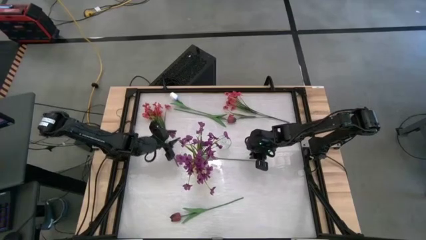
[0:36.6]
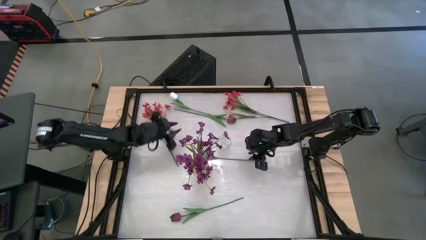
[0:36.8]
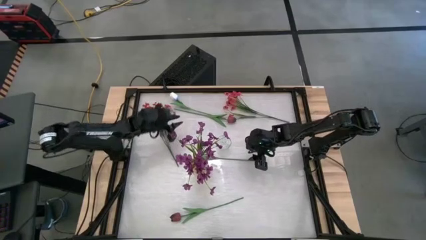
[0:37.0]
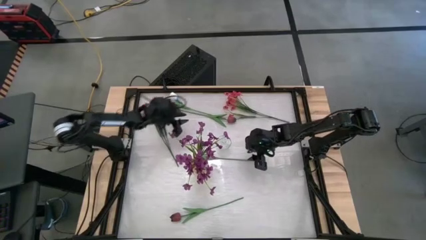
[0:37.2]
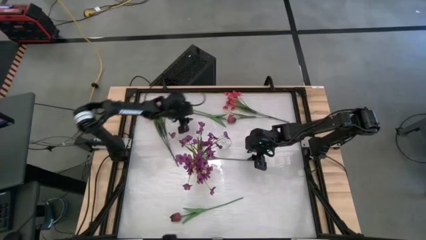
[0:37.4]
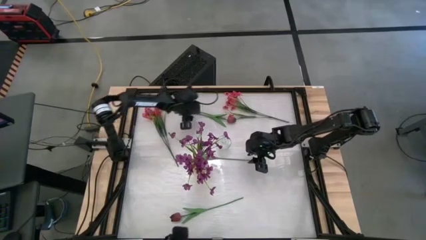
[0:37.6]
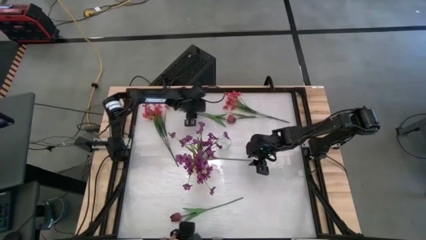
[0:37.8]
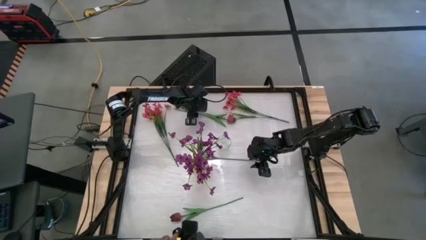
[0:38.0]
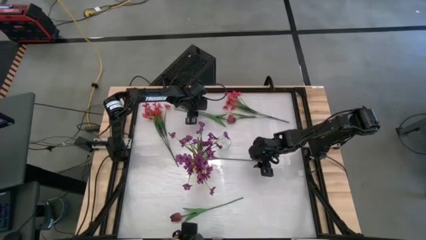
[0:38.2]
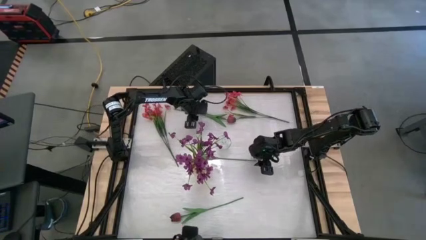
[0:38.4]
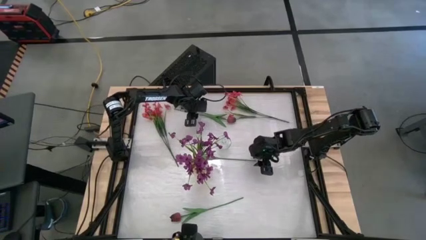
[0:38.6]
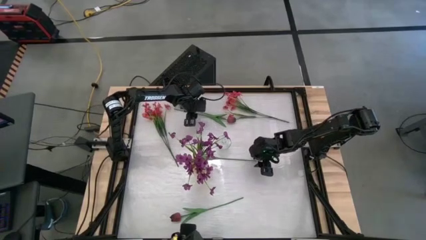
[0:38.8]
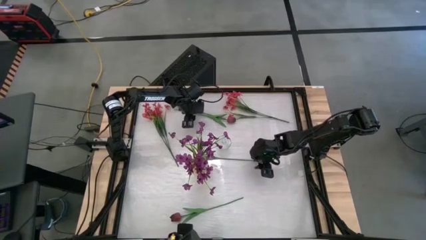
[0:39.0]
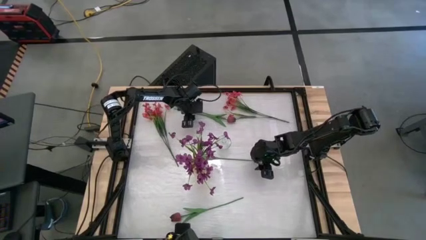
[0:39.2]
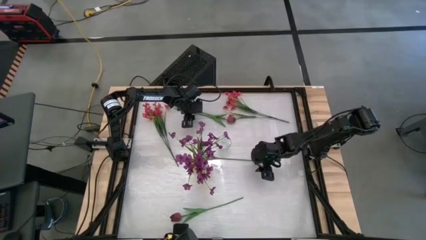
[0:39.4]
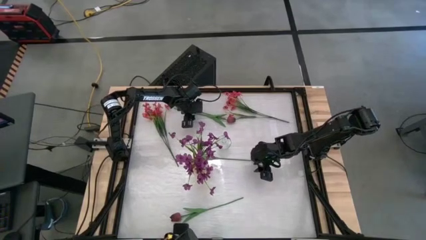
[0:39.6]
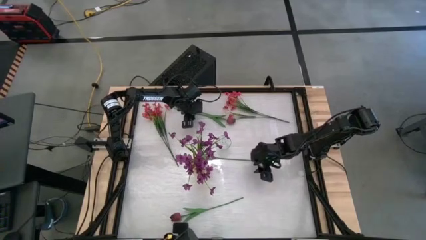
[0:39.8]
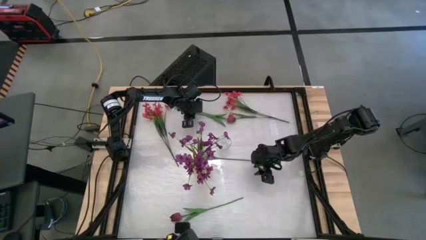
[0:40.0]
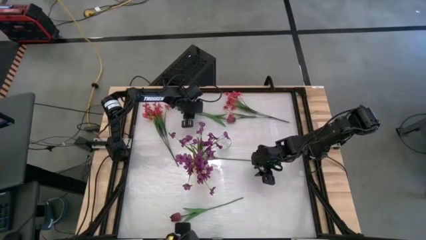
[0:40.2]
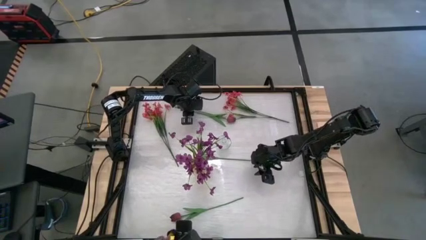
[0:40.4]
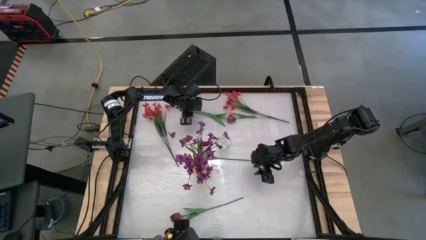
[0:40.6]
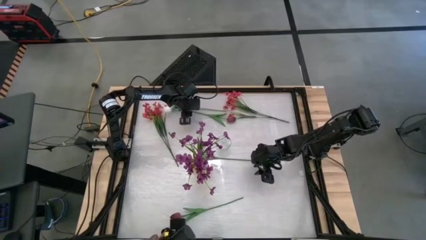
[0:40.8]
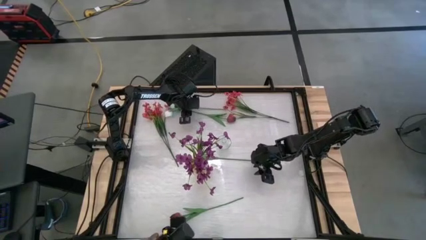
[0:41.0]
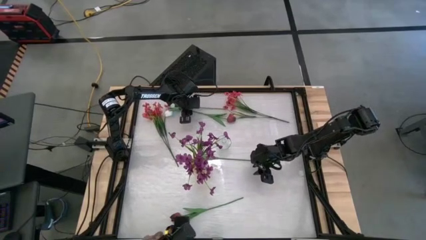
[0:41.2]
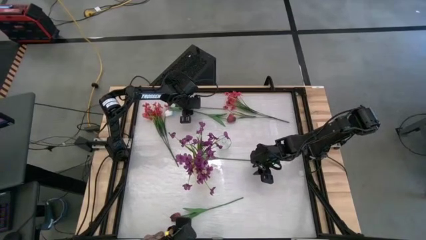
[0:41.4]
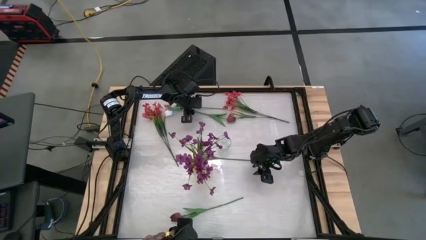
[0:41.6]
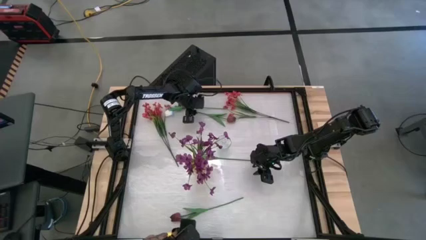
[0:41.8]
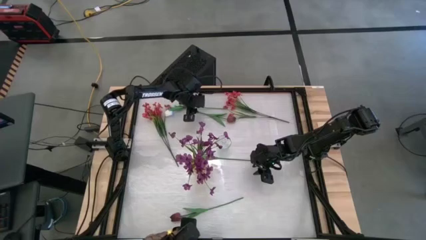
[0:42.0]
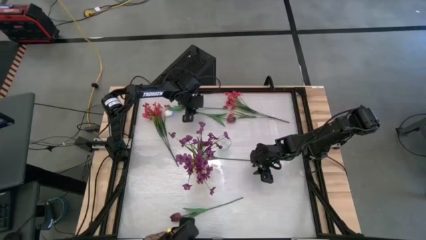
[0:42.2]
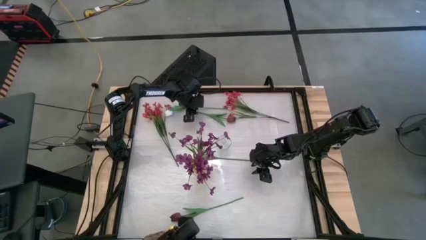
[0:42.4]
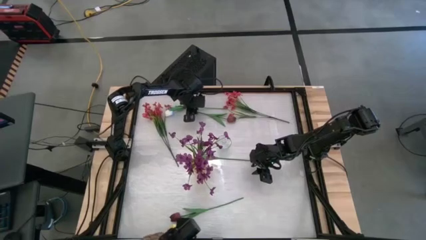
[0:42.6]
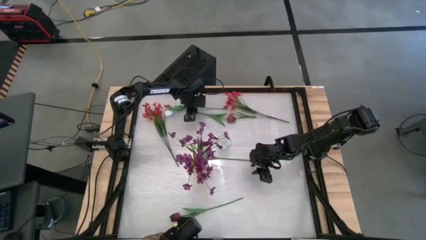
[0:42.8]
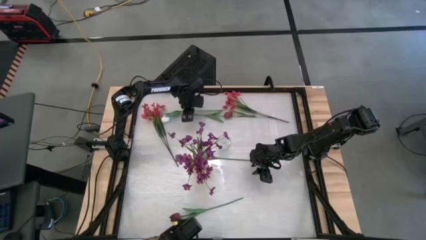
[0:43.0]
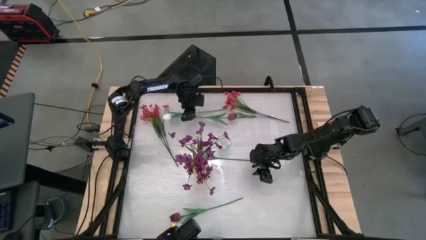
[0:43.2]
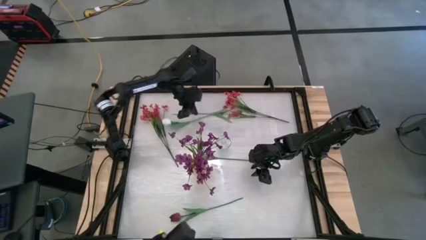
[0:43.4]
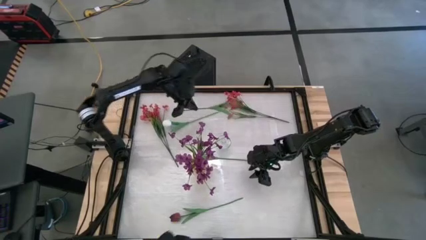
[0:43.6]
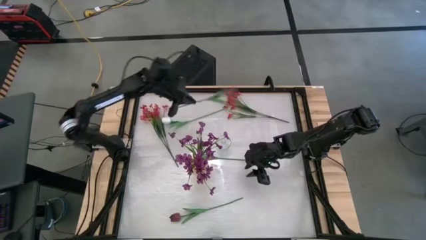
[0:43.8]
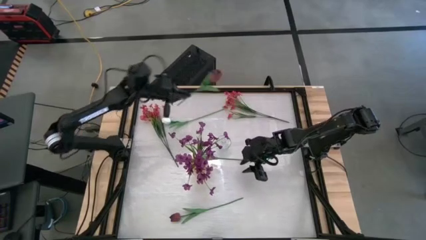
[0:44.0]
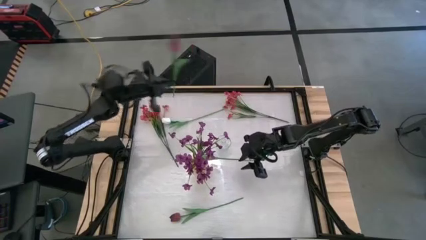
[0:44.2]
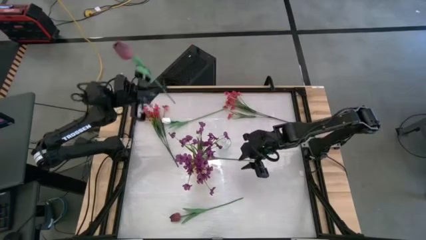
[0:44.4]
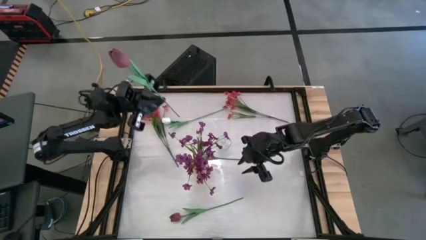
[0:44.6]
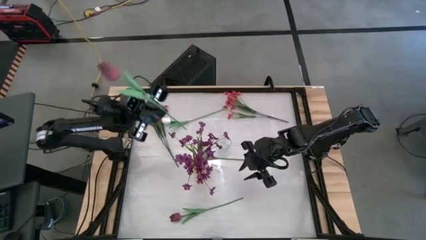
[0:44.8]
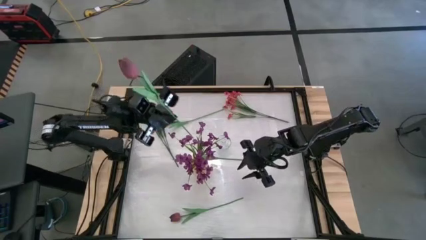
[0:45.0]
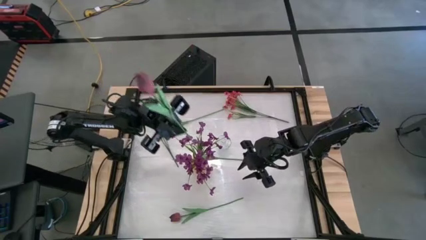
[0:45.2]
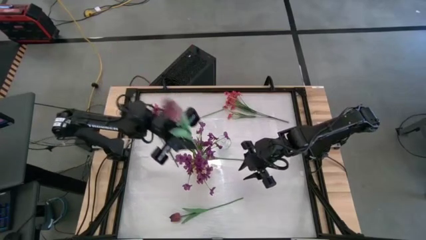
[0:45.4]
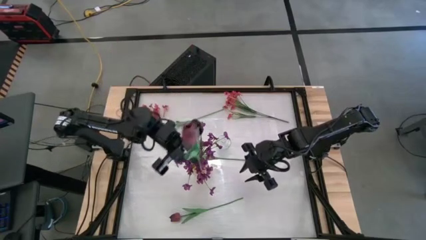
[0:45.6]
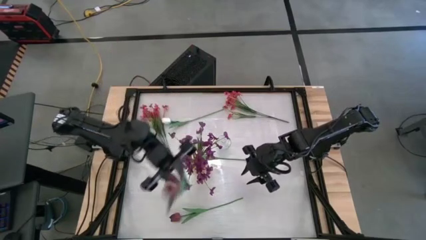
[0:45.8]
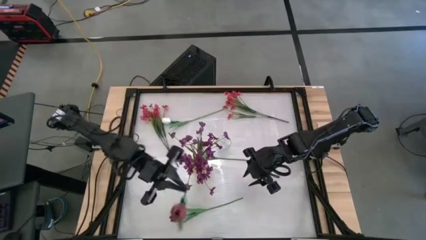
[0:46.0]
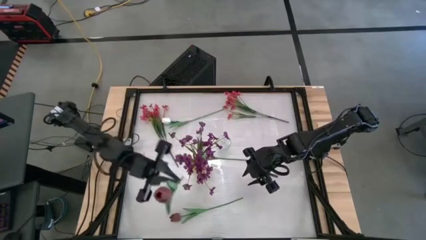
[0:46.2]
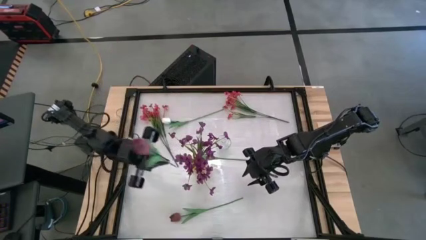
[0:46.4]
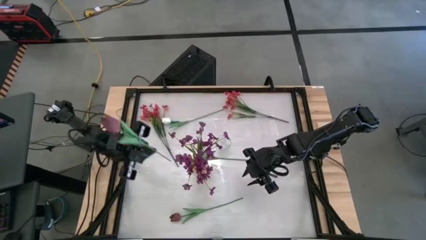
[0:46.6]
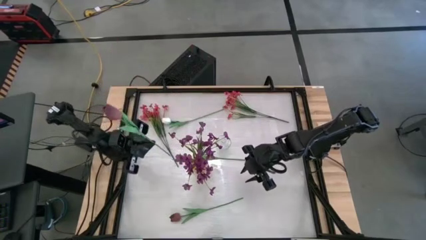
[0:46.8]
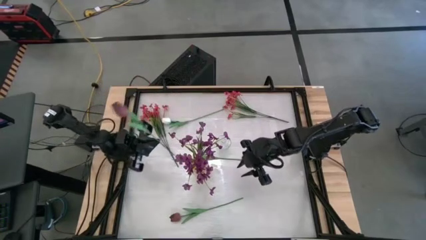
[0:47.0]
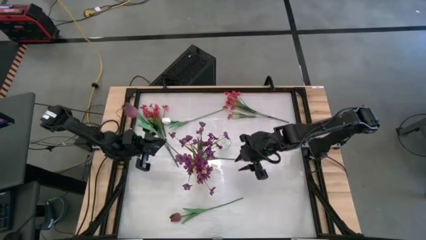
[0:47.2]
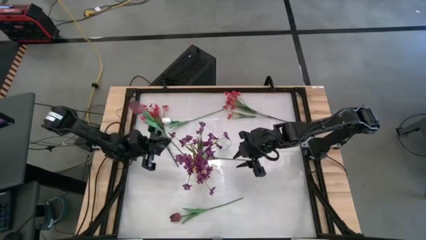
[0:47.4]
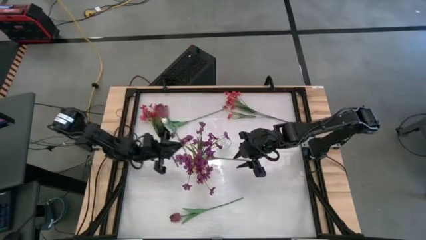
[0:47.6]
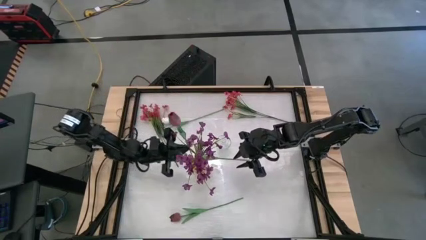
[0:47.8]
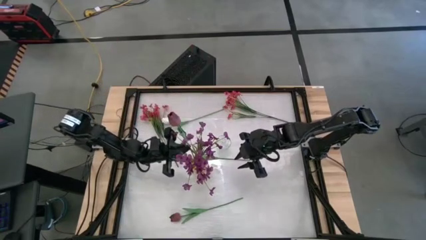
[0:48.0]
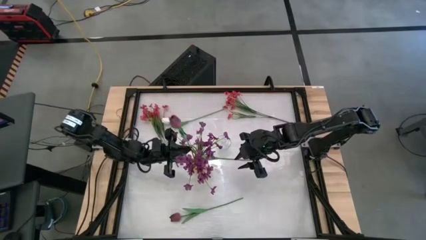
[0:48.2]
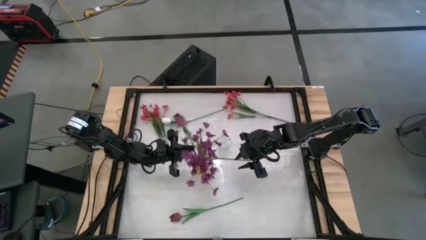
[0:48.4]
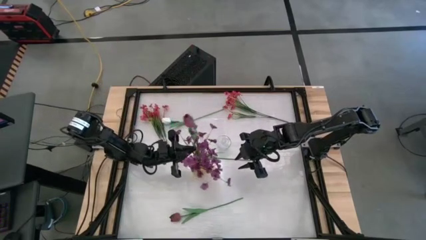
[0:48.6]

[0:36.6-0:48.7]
Task: Sort flowers into vase by color
Put the top red tulip into the yellow vase

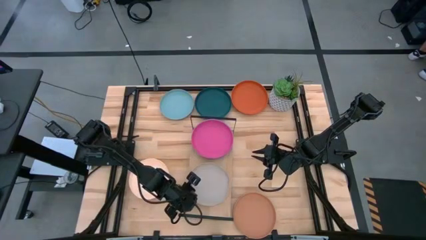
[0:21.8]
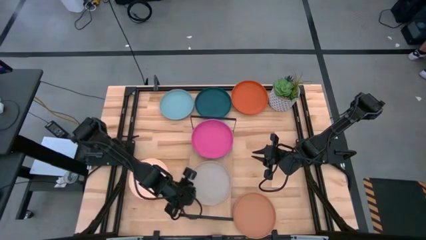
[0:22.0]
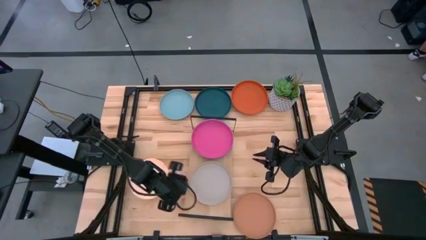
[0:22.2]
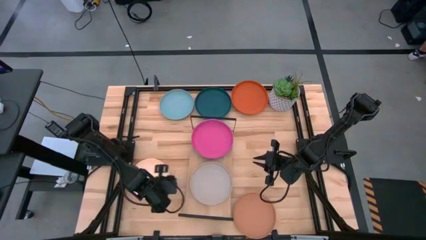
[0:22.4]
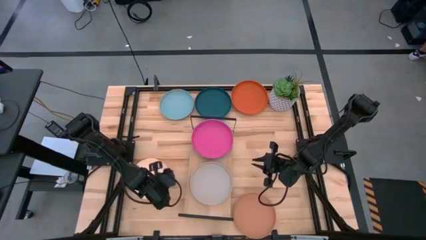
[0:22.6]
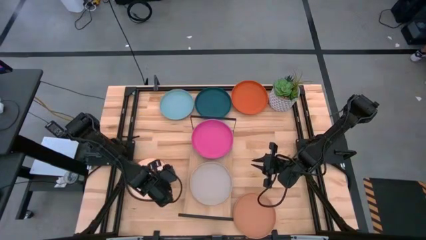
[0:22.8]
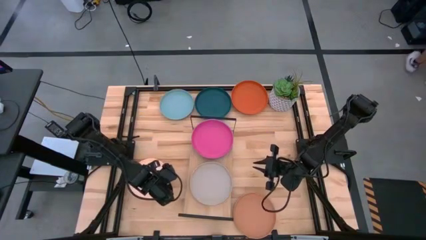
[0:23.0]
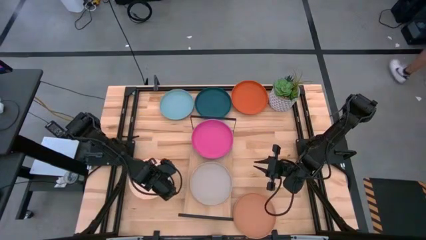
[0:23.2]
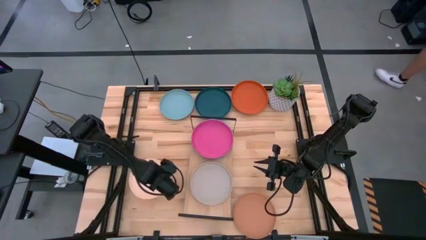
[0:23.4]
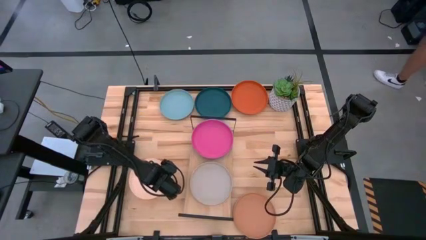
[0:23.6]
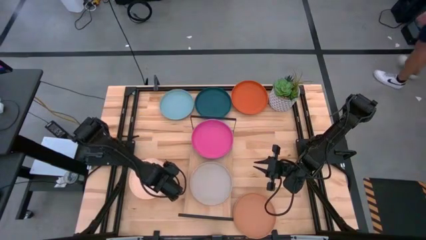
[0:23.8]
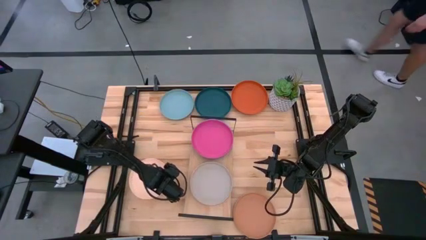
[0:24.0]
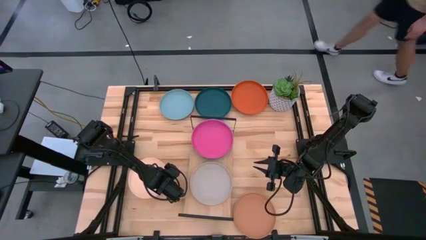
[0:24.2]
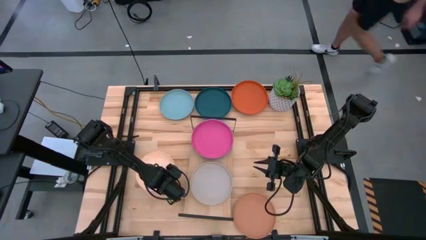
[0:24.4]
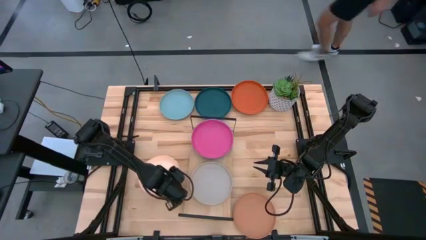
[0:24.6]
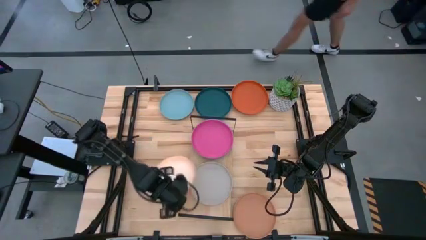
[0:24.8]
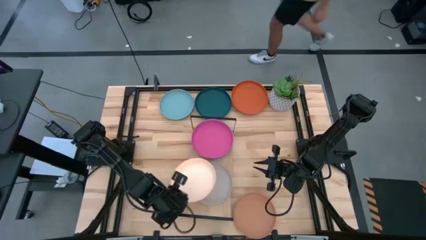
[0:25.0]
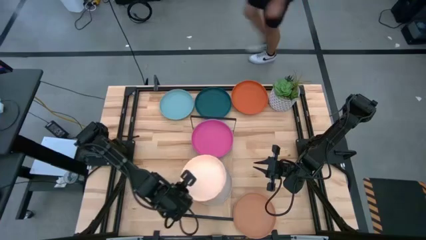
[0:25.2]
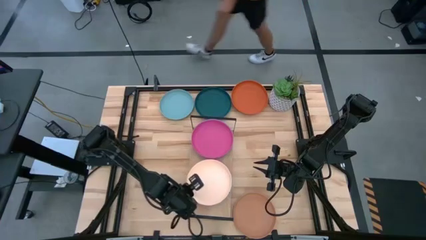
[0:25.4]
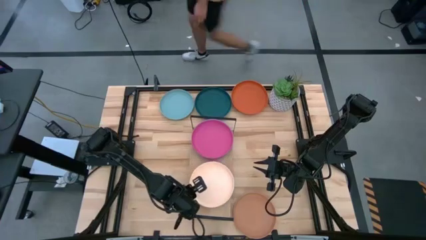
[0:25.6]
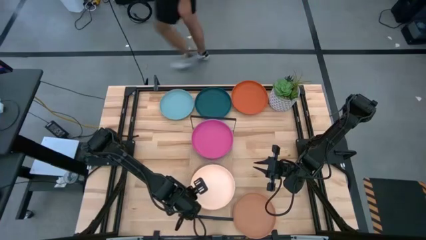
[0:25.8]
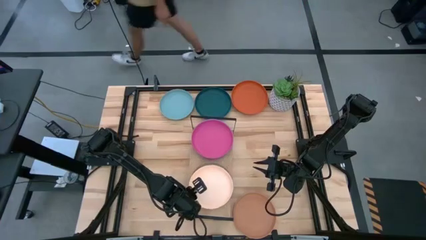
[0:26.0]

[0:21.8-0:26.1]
Task: Place and stack plates onto a shelf
Stack the light orange plate on top of the gray plate on the shelf
